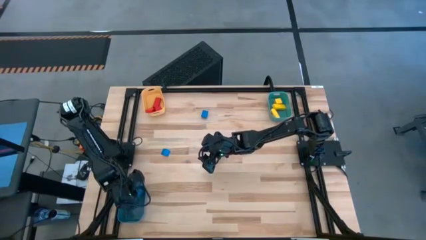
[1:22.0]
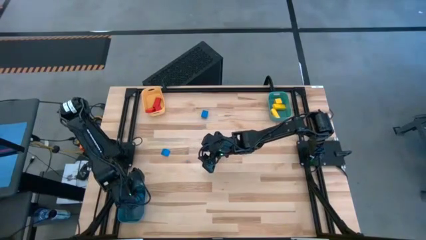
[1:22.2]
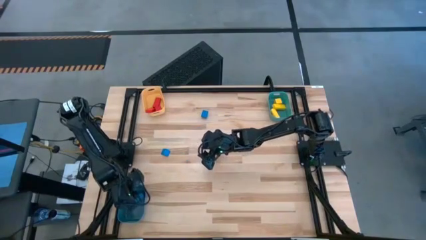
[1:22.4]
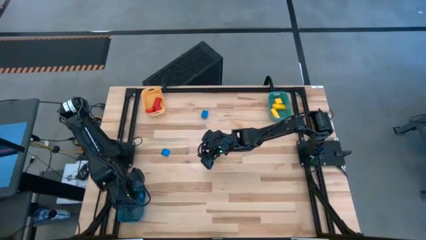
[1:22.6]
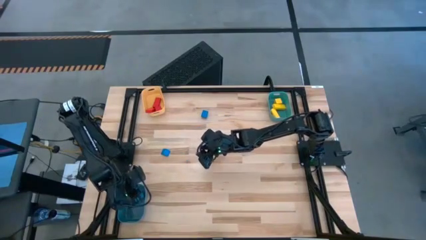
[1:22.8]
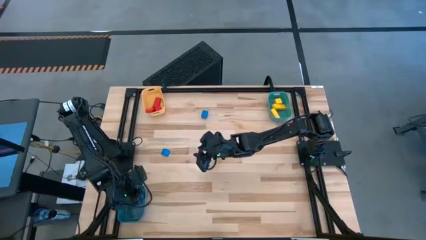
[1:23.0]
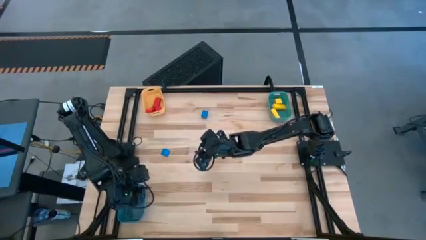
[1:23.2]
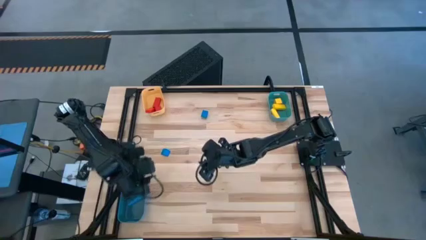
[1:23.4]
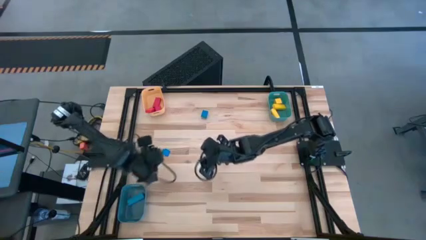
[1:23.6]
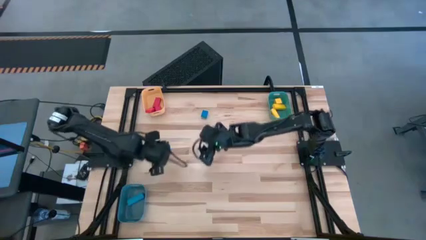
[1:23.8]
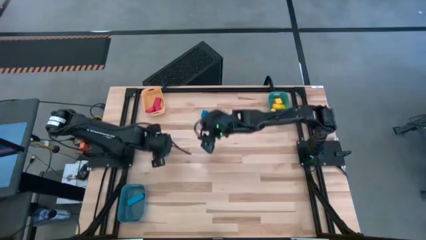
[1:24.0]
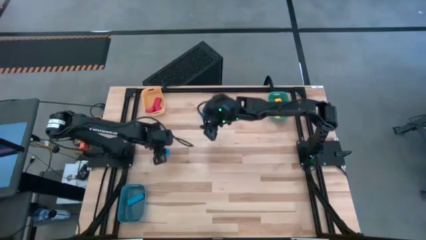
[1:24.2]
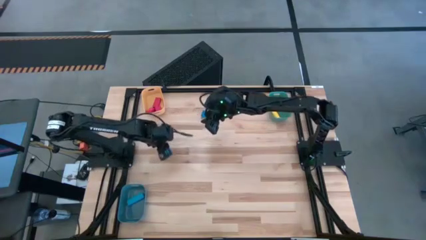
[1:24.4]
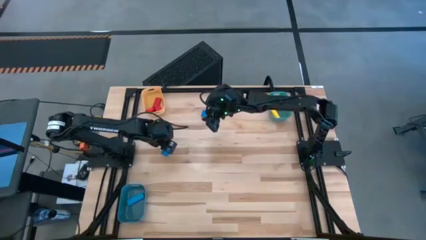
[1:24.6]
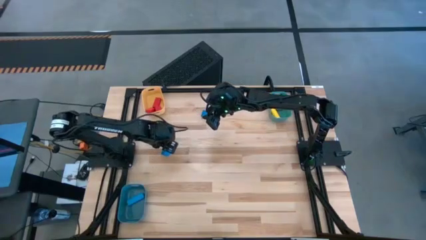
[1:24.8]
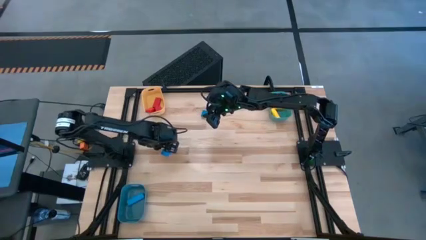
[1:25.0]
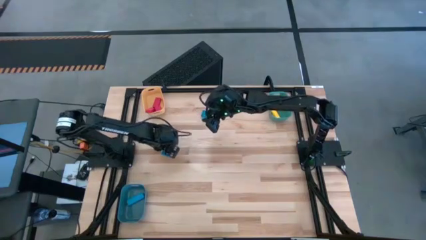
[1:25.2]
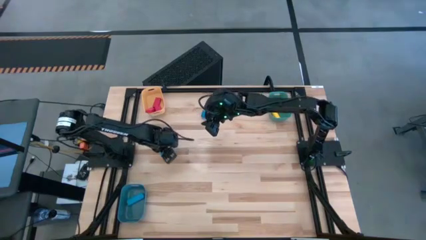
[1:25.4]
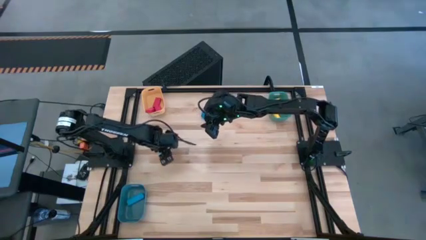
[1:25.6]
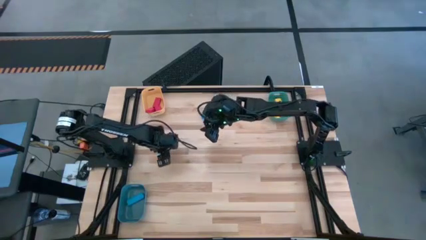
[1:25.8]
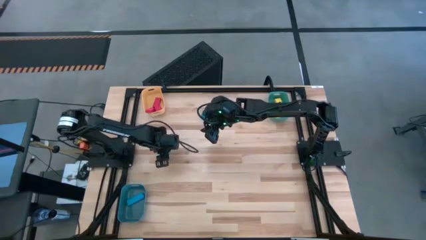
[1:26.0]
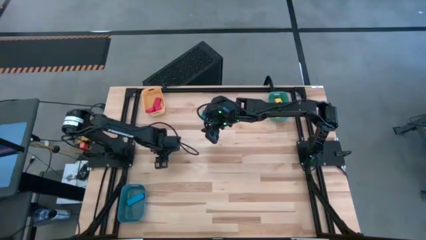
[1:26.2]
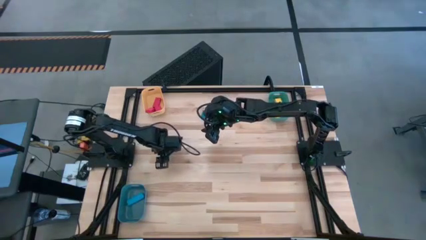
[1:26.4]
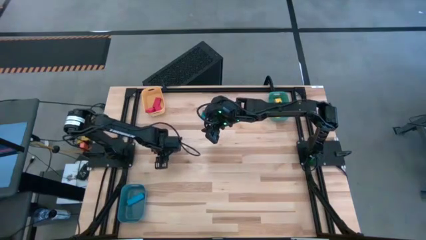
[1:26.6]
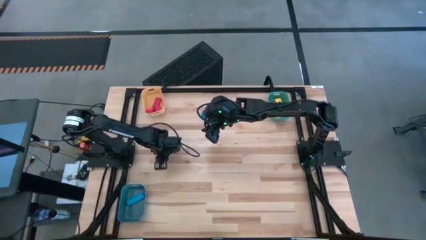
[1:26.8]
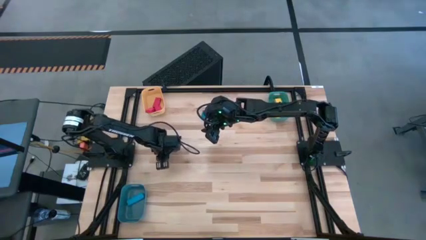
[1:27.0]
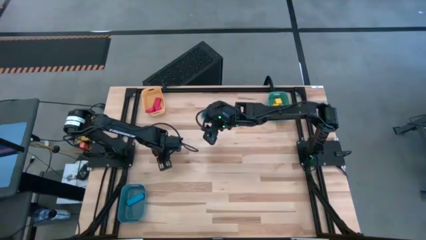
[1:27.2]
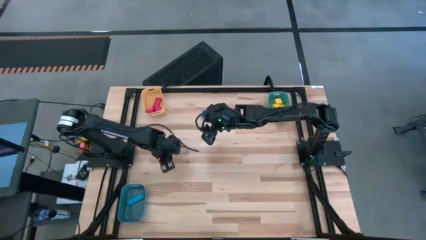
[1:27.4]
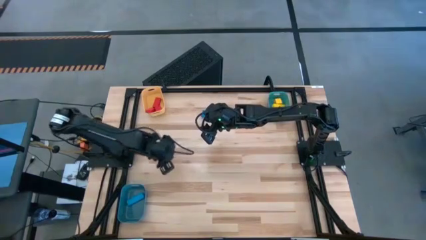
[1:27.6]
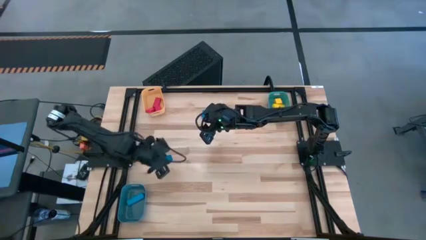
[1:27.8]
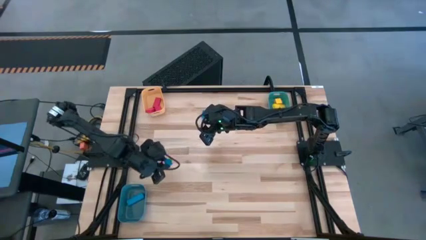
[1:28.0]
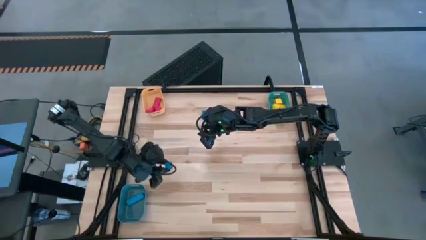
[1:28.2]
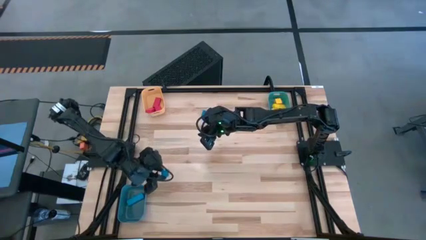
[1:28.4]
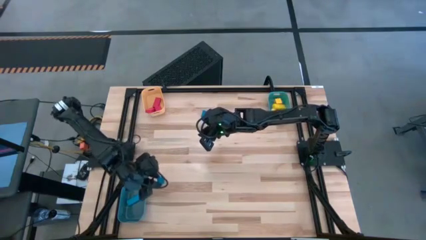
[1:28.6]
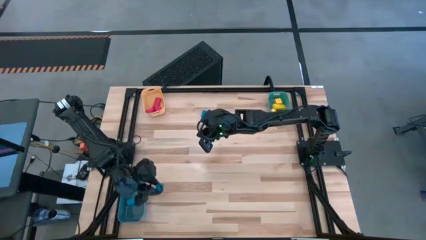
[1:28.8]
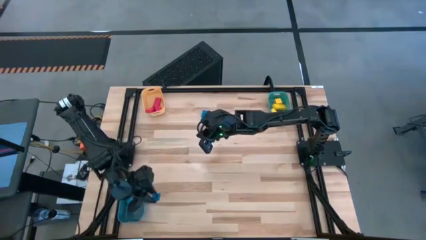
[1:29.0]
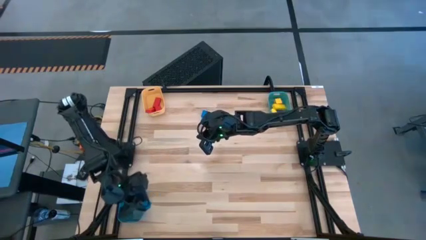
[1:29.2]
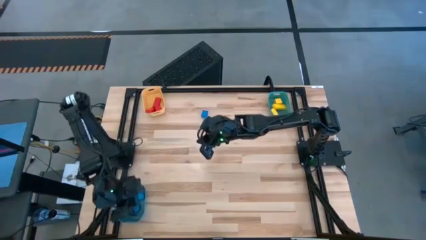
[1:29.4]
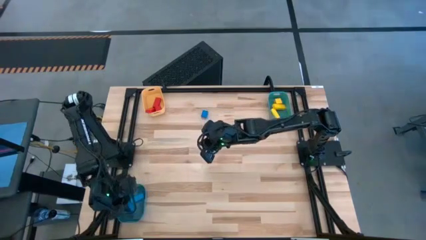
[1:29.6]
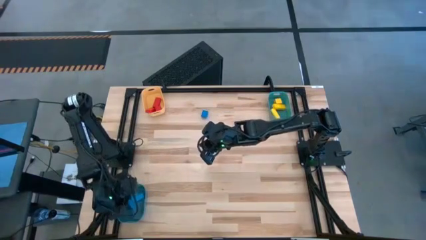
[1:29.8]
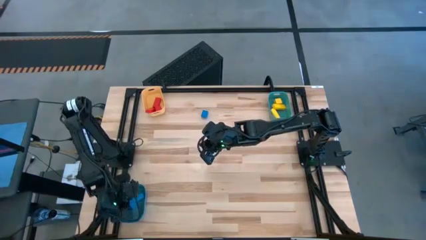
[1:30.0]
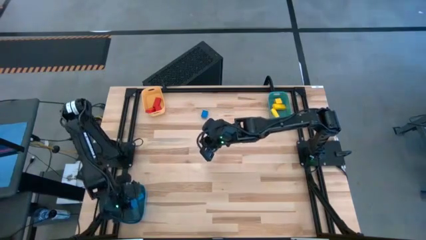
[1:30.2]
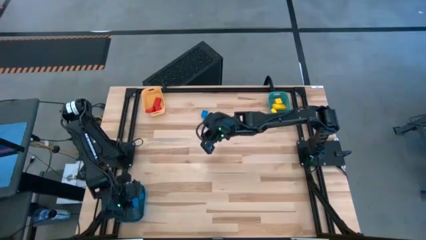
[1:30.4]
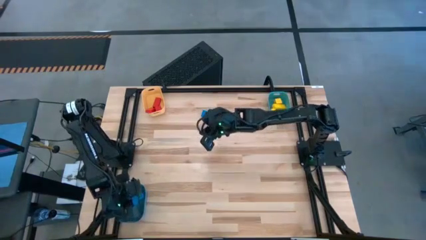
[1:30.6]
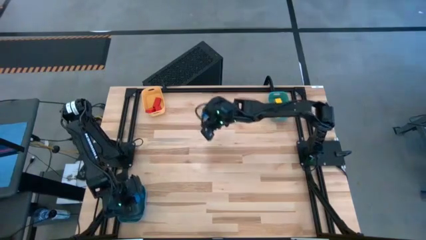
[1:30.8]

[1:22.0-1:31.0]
Task: Sort & place blocks by color
Put the bottom blue block into the blue bin

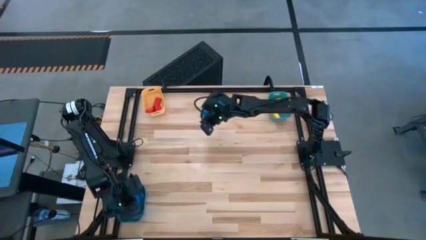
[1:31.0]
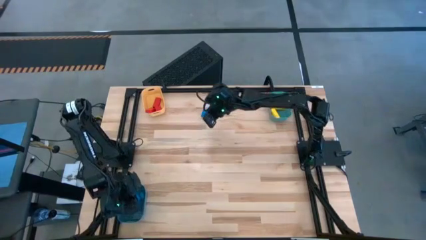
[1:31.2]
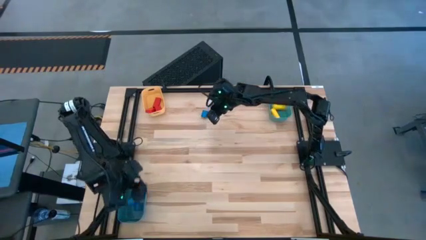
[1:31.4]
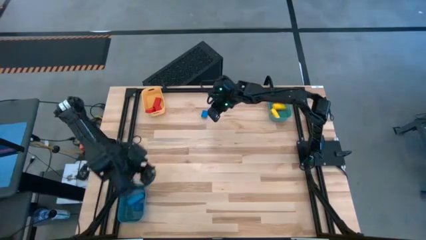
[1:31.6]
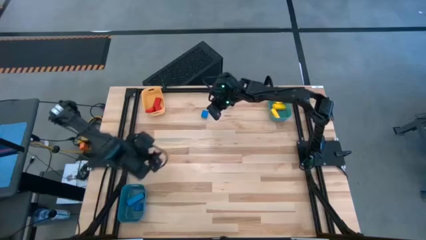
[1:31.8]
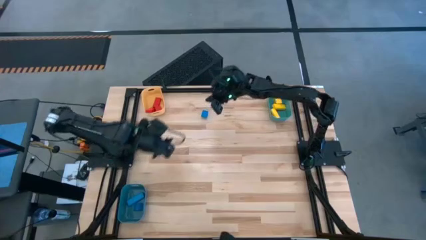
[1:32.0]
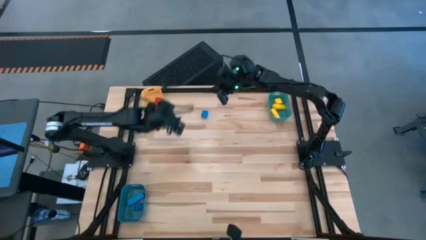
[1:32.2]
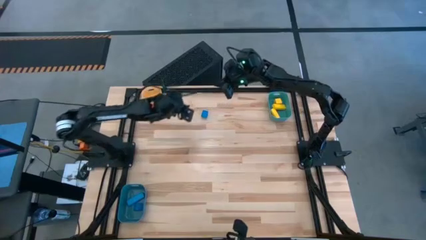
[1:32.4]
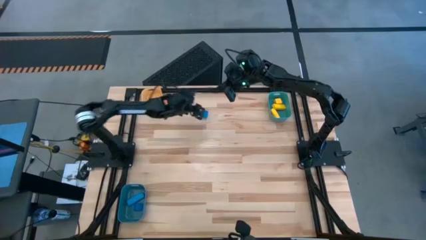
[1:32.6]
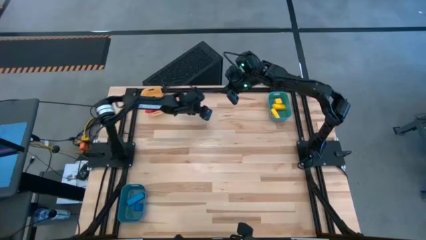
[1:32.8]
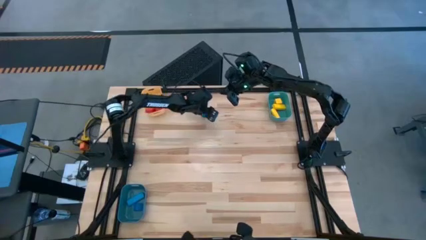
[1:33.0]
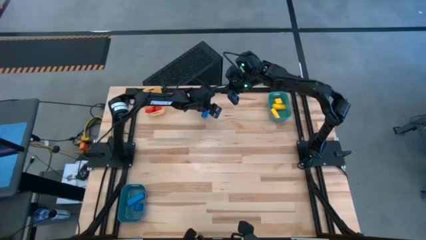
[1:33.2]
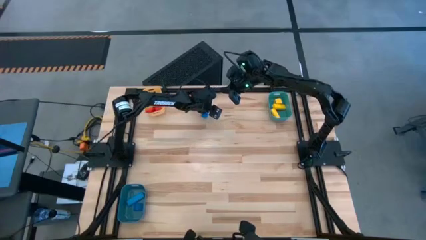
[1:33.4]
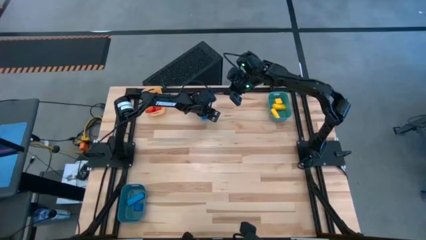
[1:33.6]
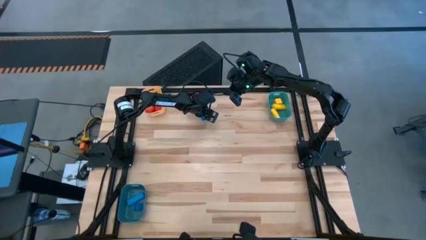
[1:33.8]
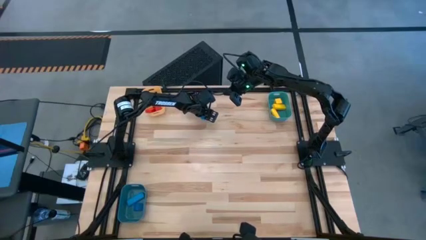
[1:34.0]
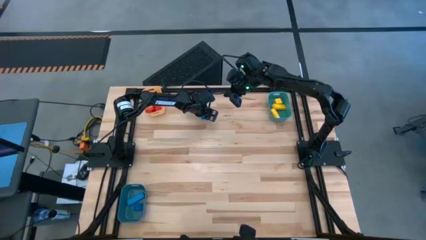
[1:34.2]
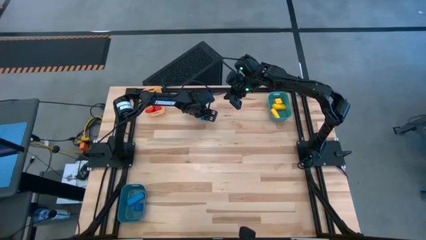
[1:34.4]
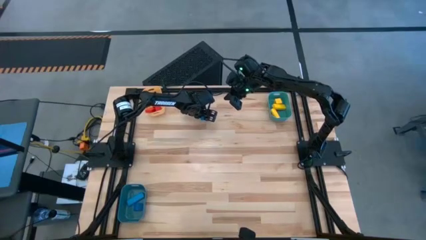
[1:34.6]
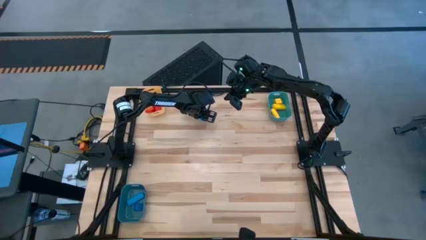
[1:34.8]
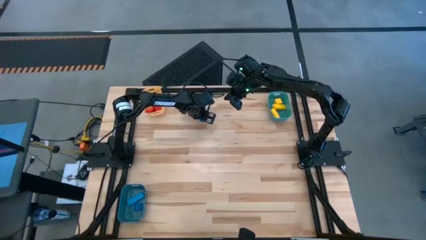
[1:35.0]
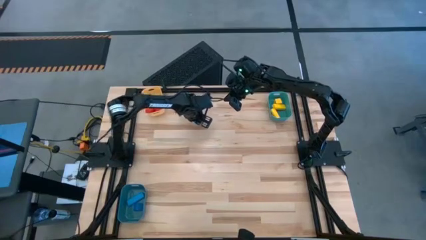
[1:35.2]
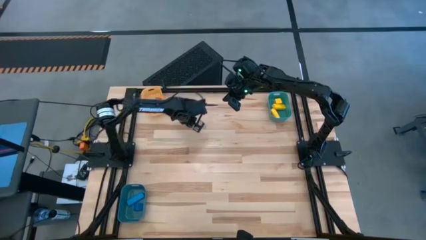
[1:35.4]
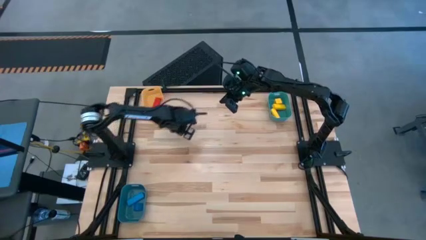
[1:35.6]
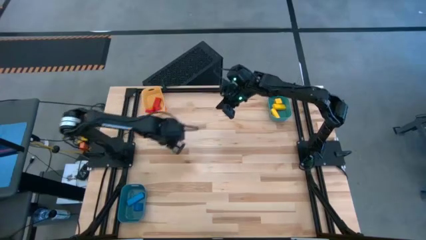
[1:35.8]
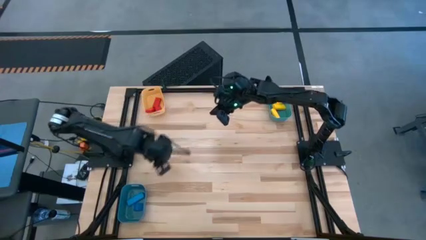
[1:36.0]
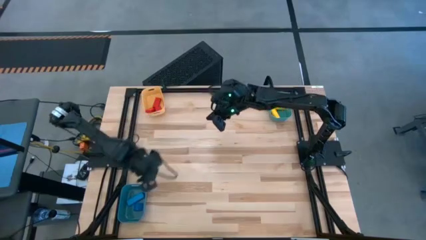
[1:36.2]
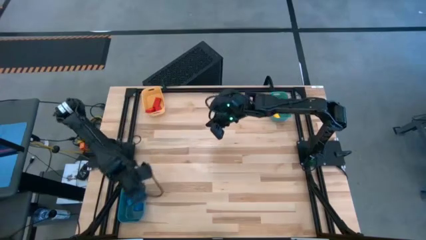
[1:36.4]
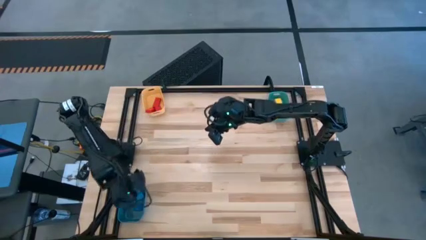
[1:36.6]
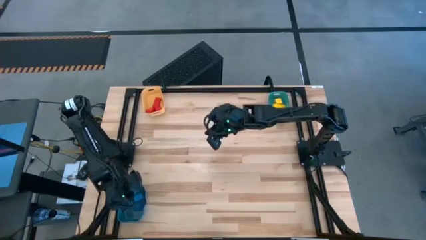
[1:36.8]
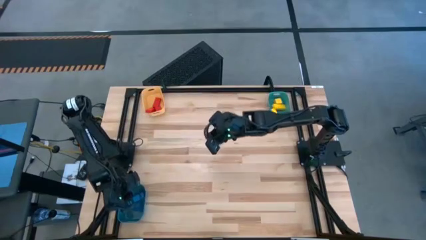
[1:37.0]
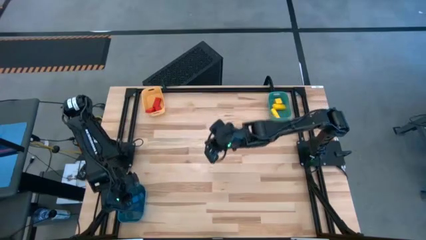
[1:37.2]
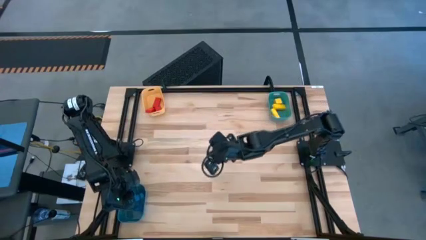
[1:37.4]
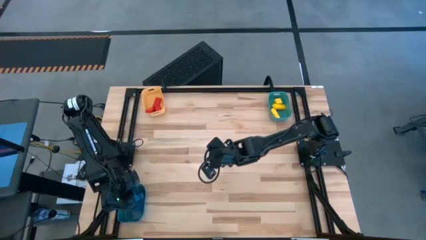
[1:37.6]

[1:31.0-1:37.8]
Put the blue block into the blue bin
